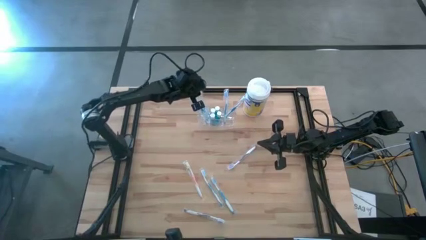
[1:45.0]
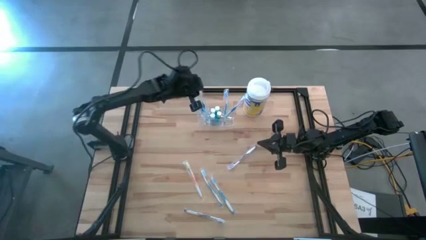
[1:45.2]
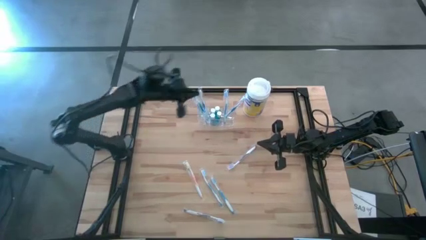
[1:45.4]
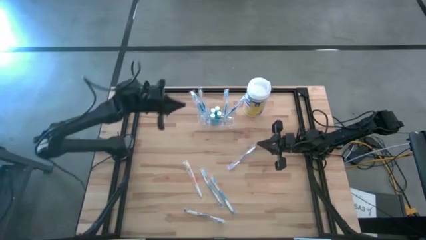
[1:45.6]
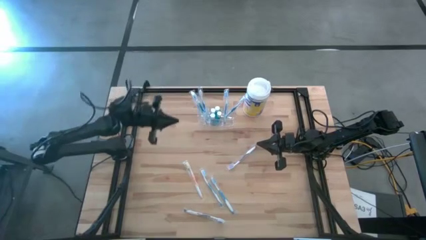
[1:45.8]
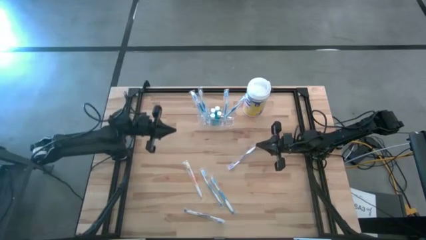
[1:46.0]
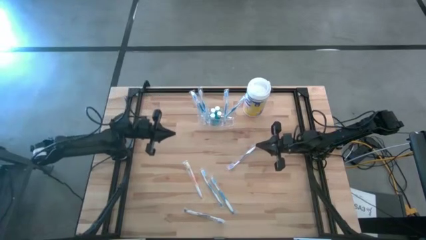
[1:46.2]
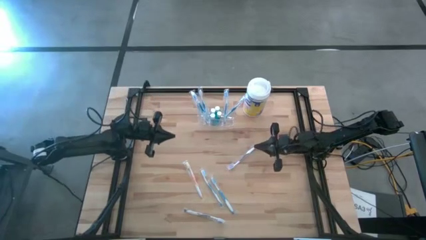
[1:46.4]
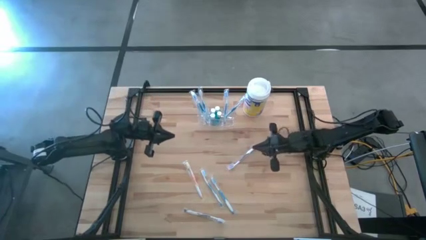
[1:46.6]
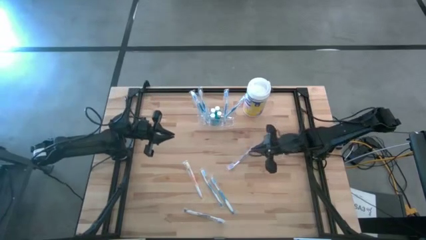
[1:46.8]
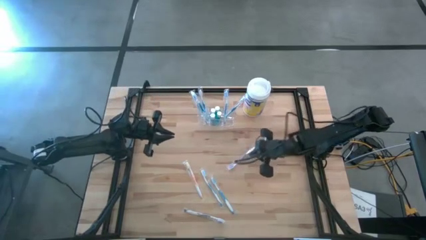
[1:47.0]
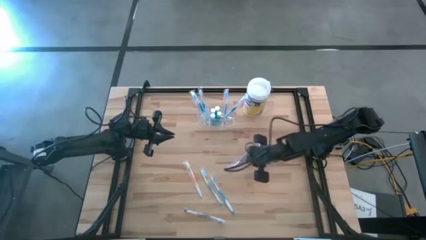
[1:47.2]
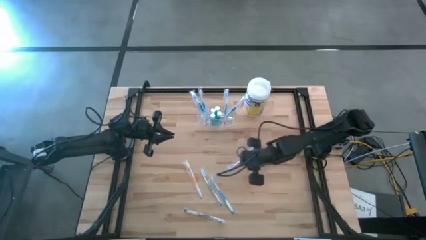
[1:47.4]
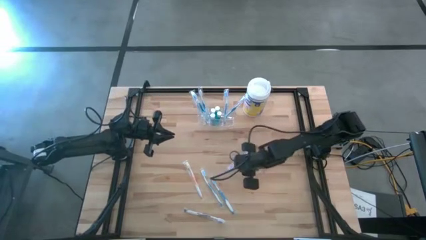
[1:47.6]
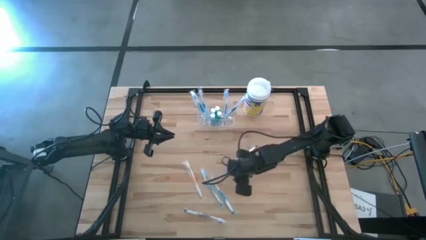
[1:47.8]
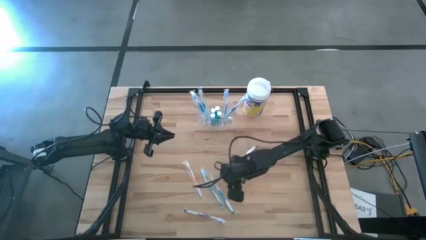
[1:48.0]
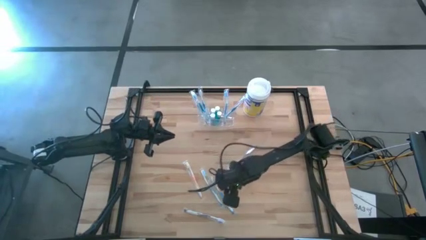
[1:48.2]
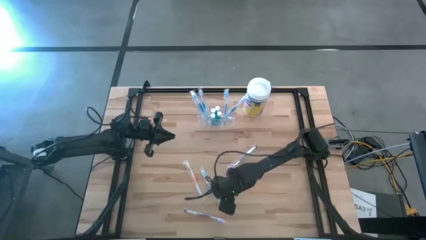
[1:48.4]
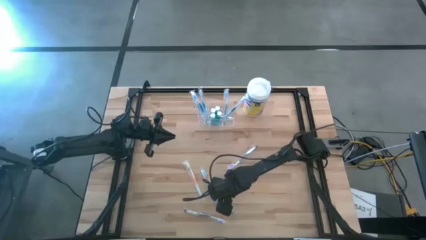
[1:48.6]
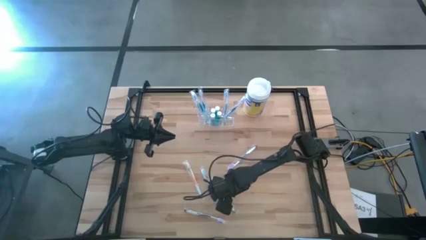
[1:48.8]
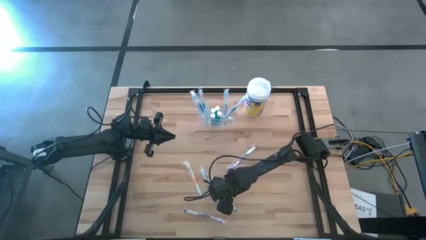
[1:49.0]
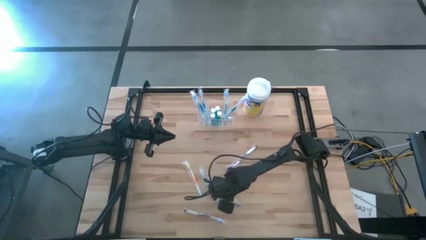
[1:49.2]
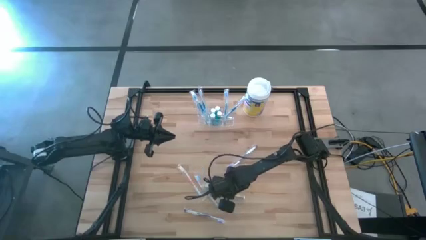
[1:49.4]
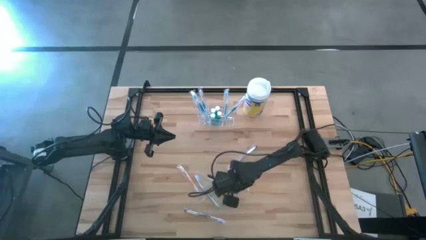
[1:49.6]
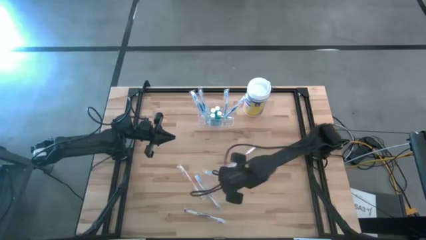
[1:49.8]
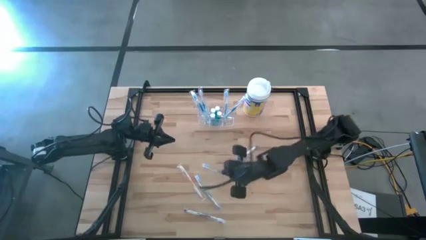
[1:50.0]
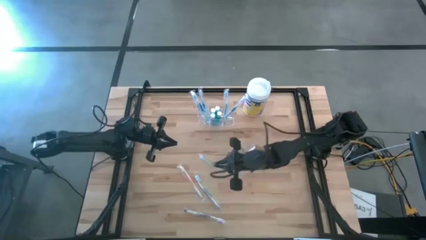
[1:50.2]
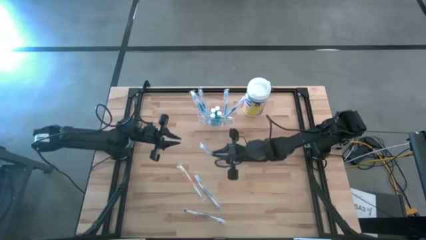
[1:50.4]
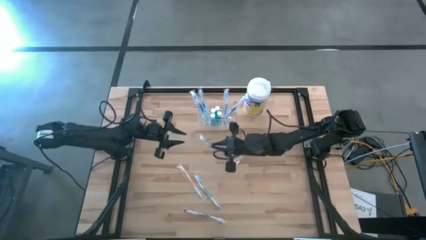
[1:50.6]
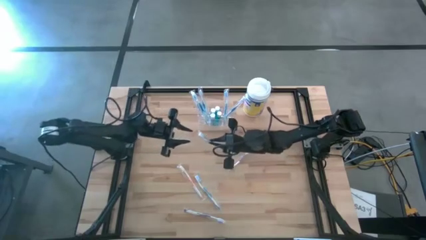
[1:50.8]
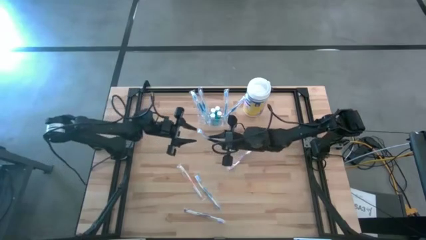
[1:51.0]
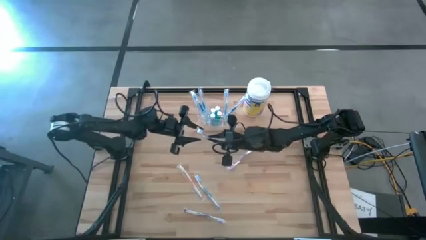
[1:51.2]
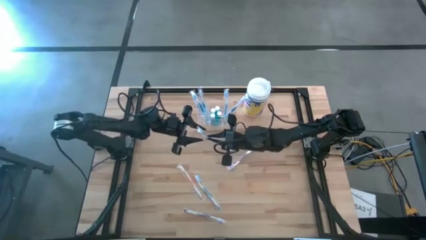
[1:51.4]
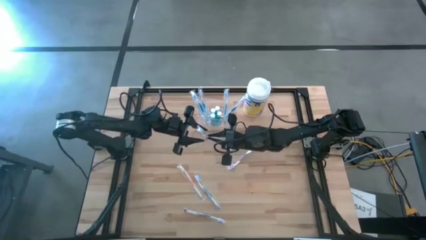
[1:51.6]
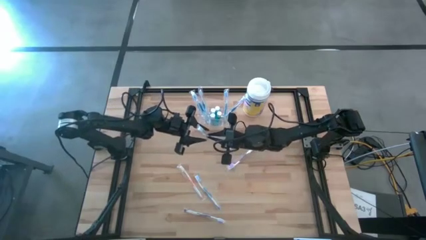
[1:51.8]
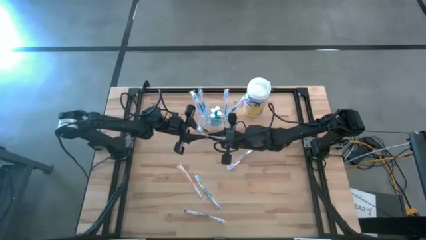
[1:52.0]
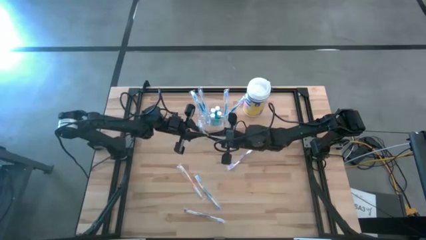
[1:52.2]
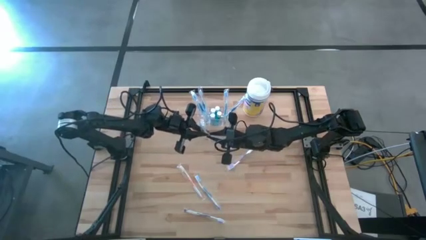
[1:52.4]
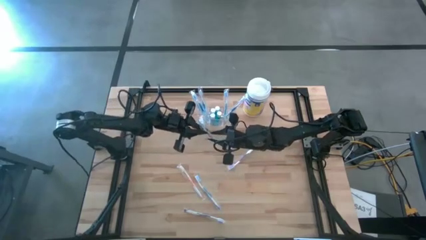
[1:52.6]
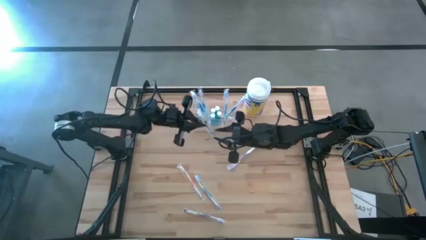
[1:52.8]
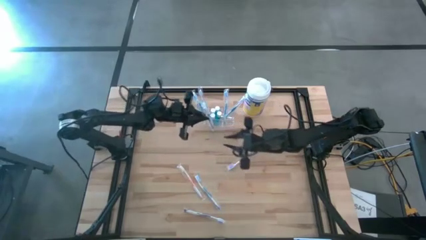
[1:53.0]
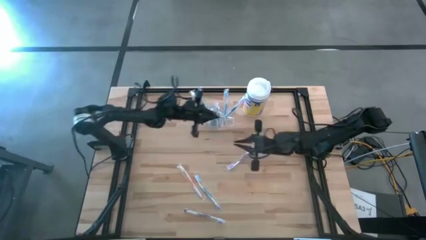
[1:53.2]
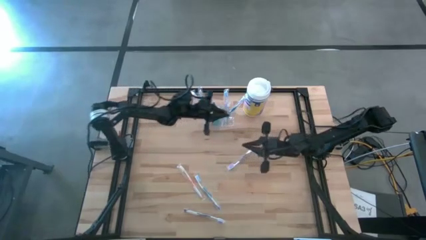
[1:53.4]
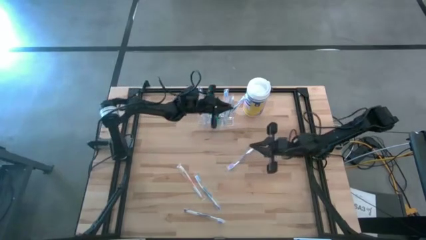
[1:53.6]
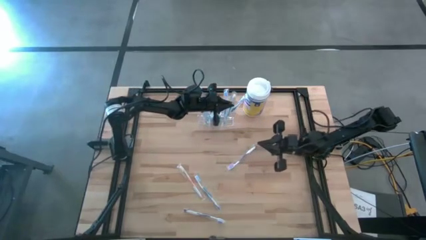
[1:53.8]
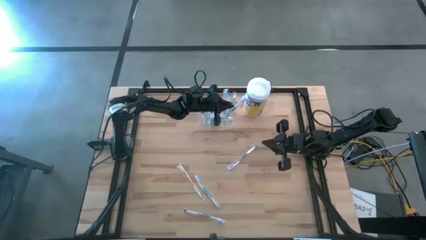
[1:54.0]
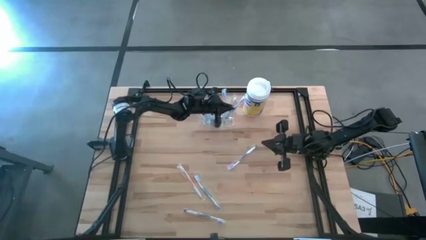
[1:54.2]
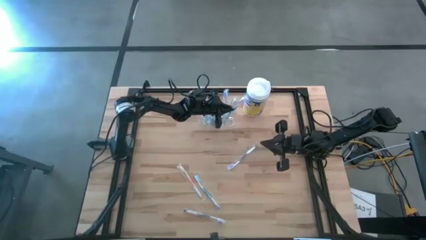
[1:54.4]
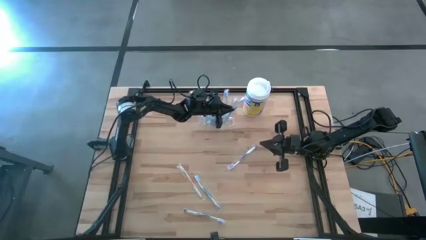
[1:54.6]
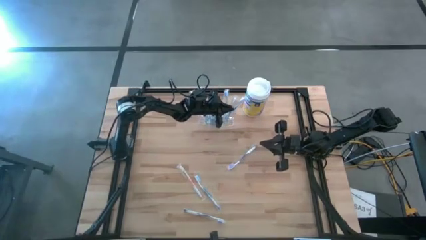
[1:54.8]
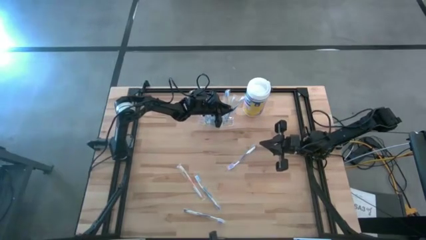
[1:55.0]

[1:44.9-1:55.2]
Task: Pick & Place toothbrushing station
Put the blue toothbrush into the transparent toothbrush holder

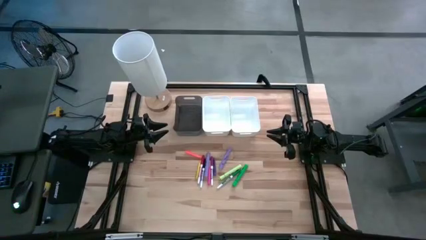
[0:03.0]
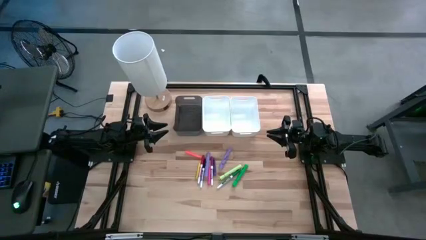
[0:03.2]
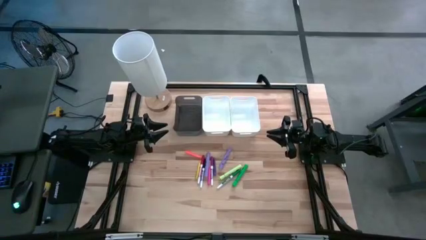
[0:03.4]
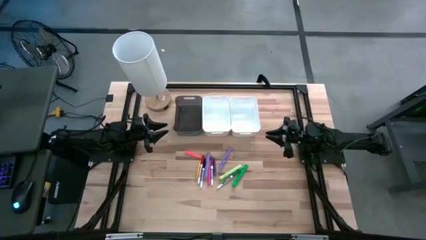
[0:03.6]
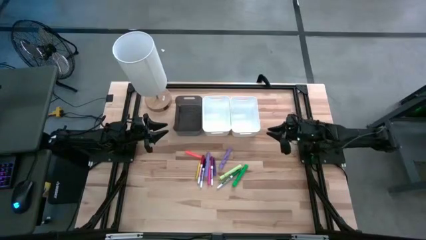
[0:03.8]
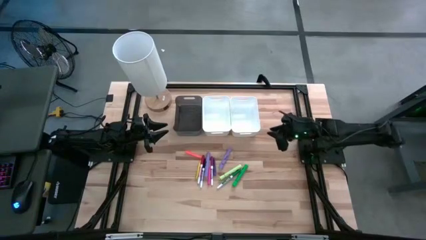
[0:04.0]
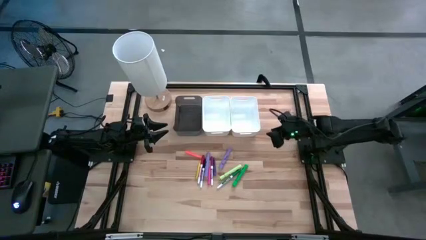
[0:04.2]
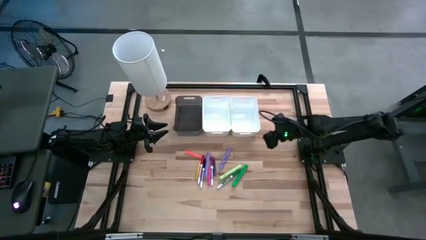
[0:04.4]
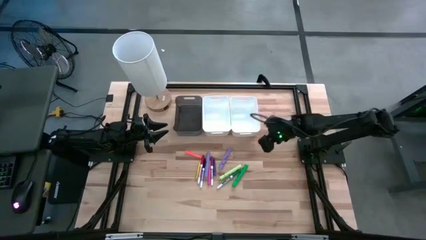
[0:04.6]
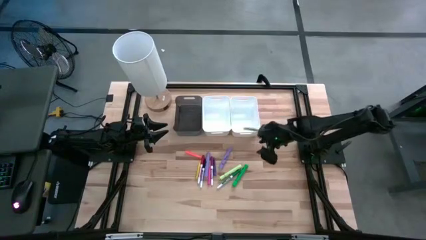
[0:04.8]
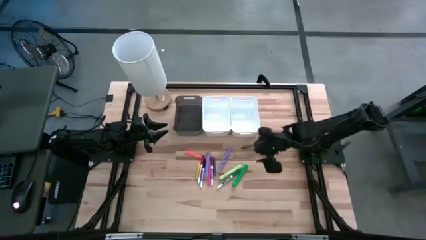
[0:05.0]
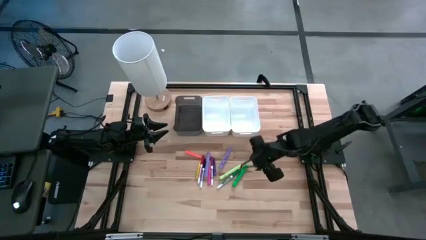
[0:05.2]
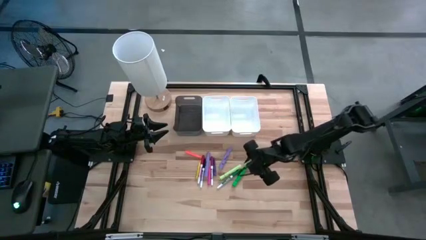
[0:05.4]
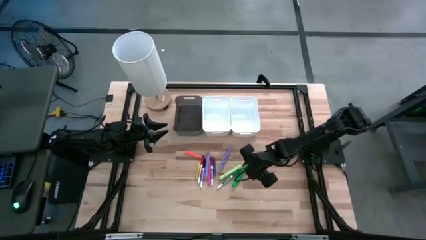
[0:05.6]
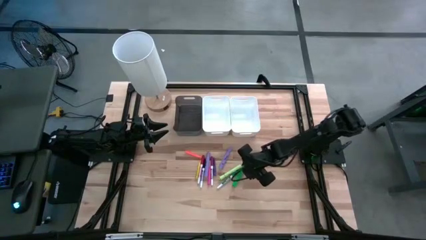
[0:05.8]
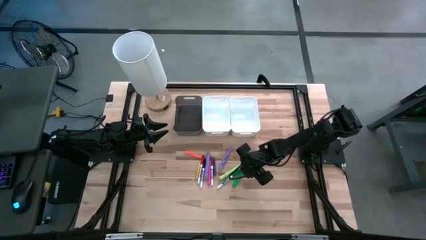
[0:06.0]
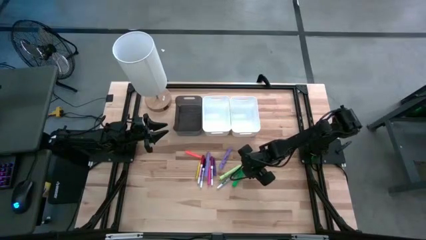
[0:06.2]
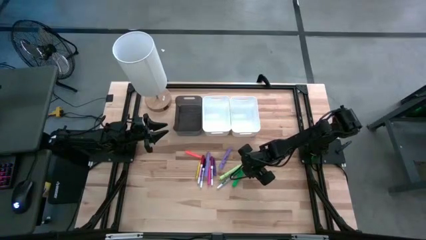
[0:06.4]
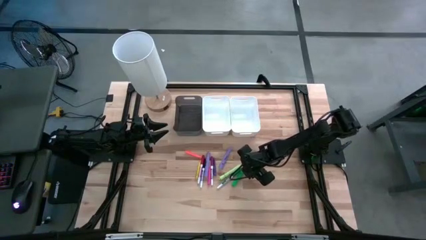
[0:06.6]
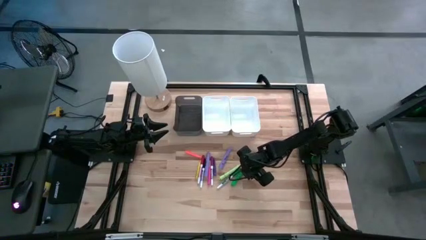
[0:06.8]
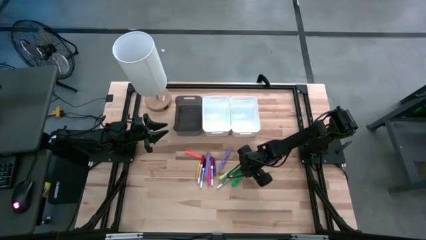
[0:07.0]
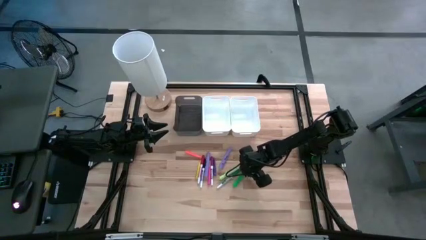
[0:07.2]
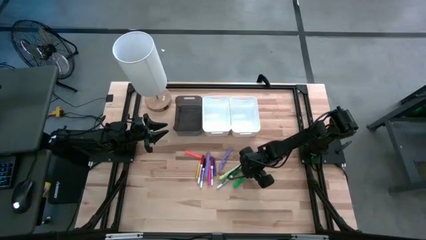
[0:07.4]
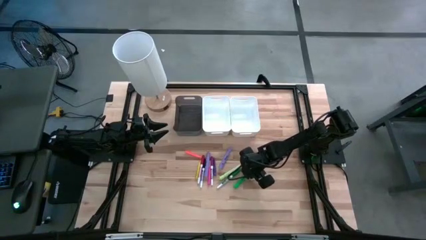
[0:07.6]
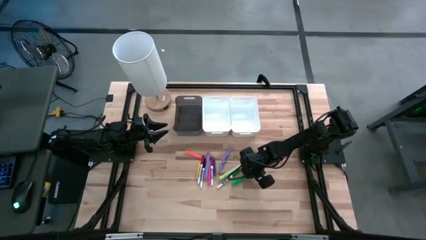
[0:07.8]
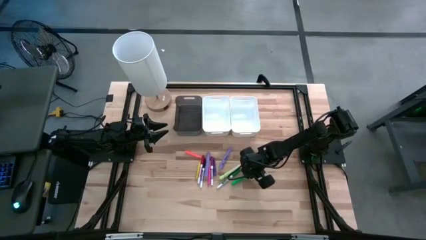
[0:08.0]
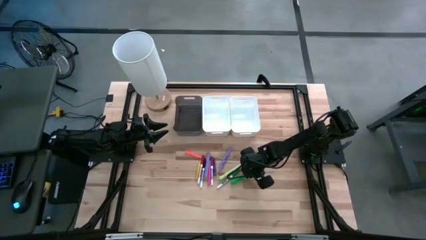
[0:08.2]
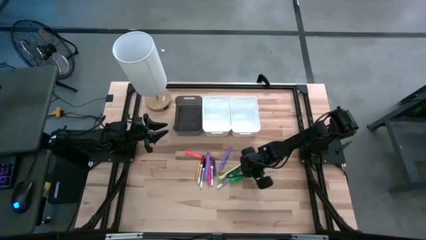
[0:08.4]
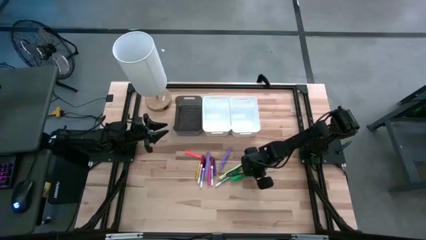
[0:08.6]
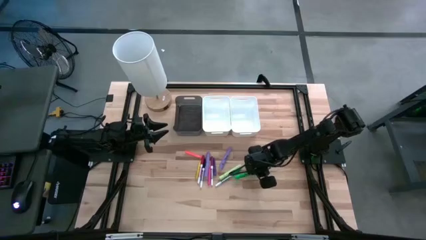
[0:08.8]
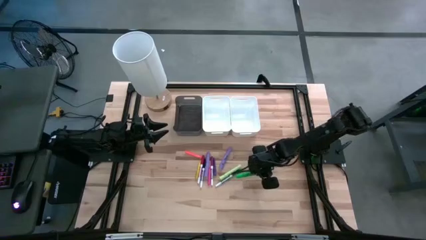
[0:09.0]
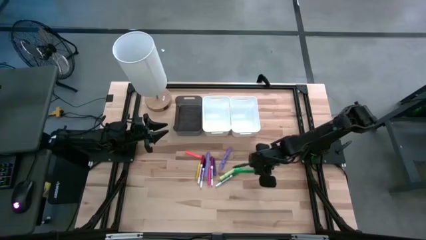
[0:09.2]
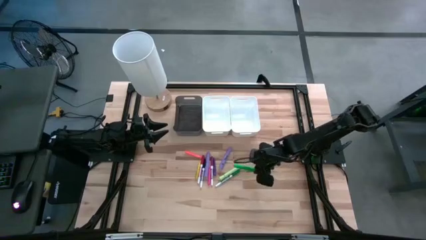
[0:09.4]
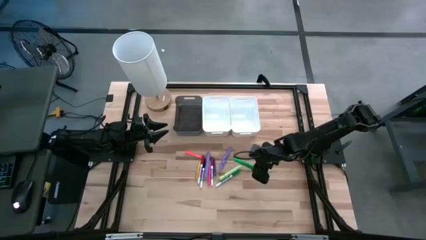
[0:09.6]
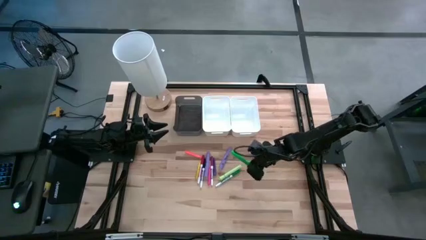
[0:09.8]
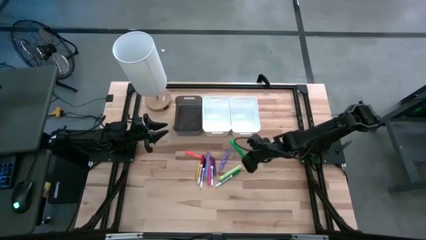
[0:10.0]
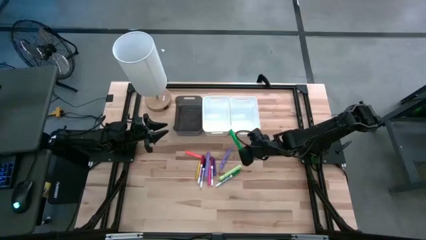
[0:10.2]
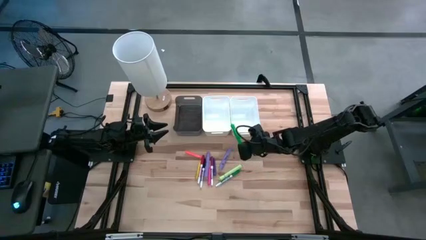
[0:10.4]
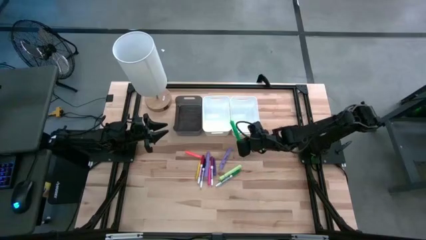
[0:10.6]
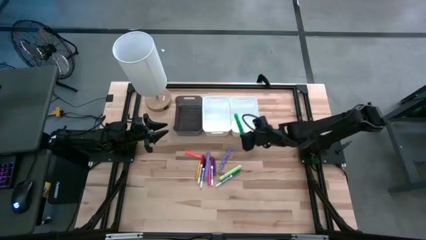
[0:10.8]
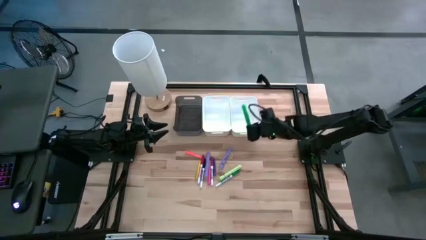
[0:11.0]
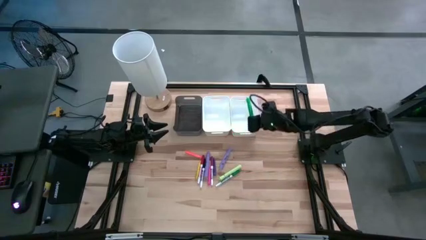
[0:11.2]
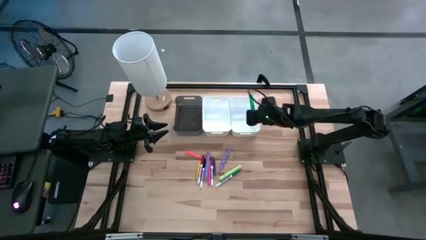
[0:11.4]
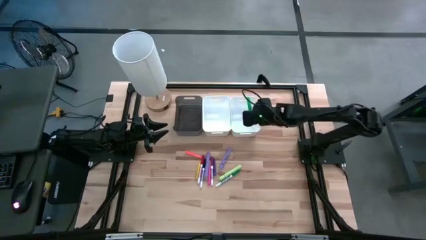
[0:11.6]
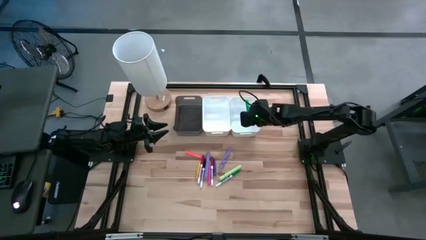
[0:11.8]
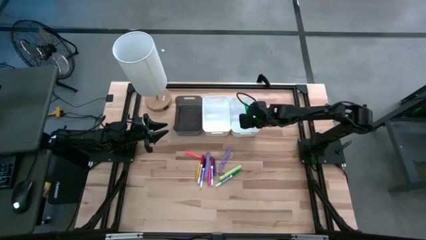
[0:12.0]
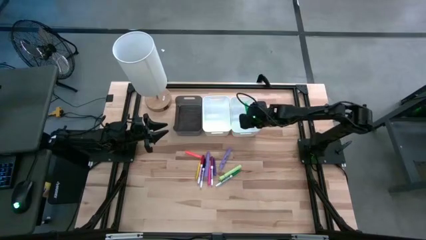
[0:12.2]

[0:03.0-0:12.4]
Task: Pick & Place Markers
Put the green highlighter pen into the right white bin
